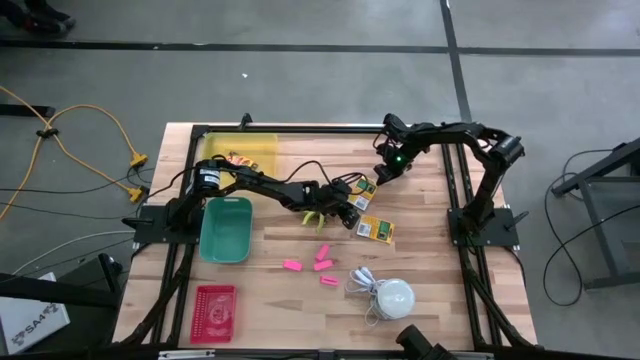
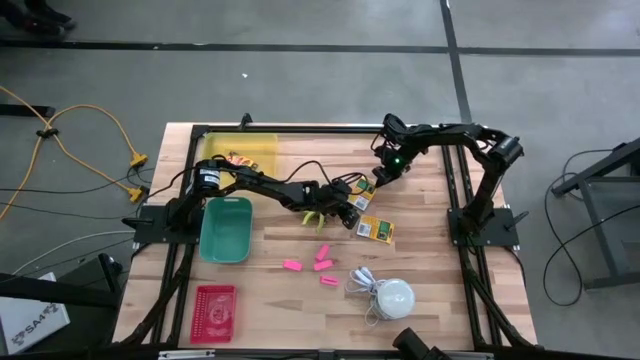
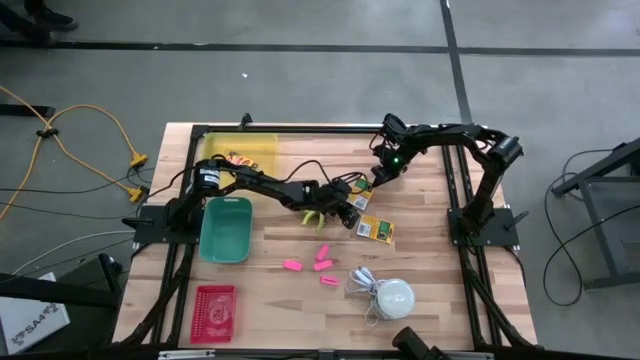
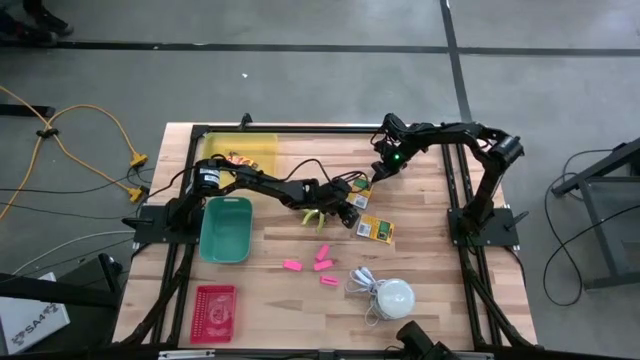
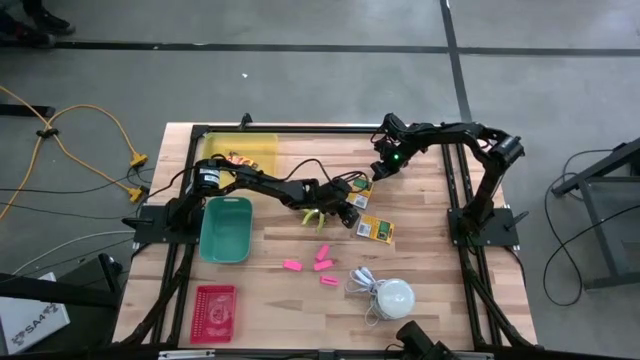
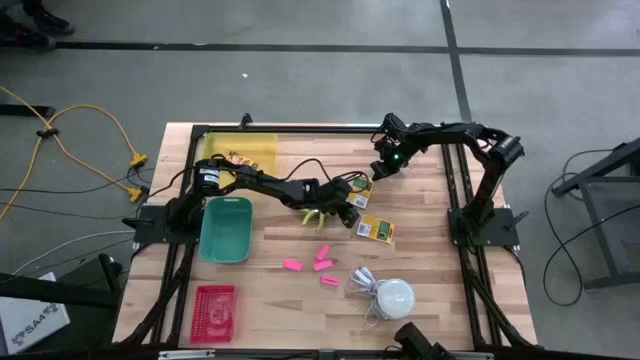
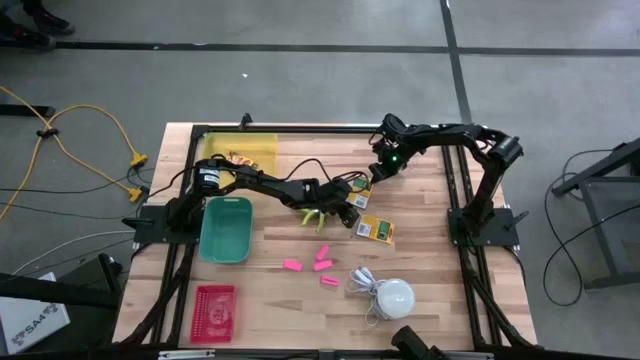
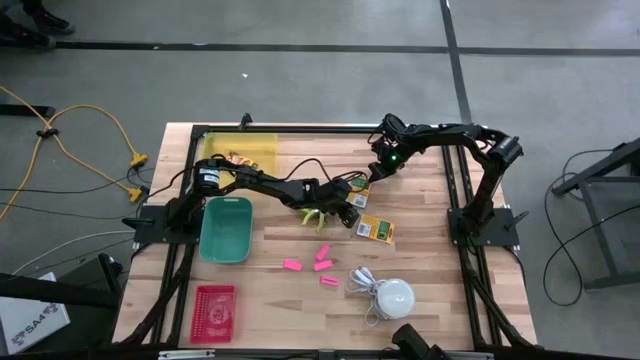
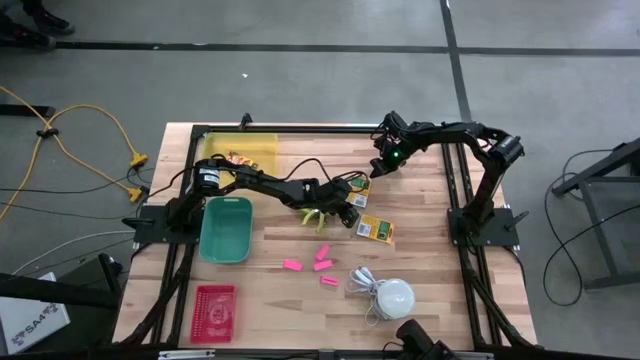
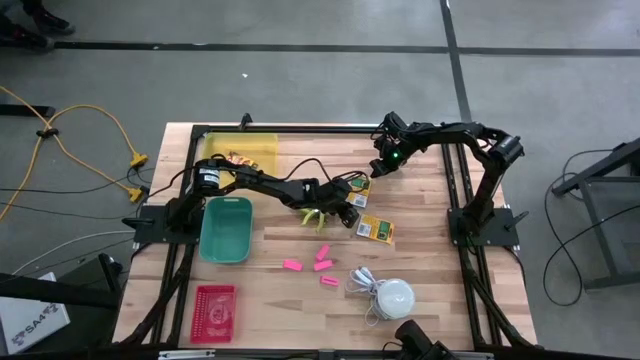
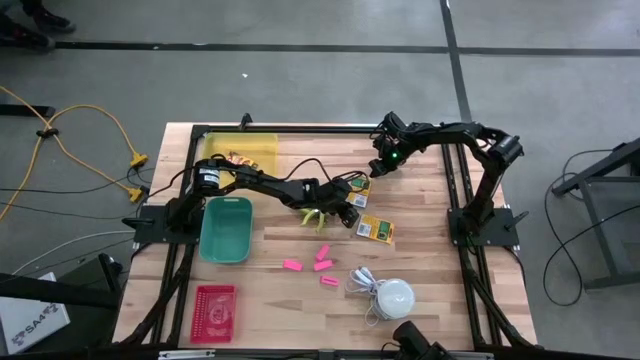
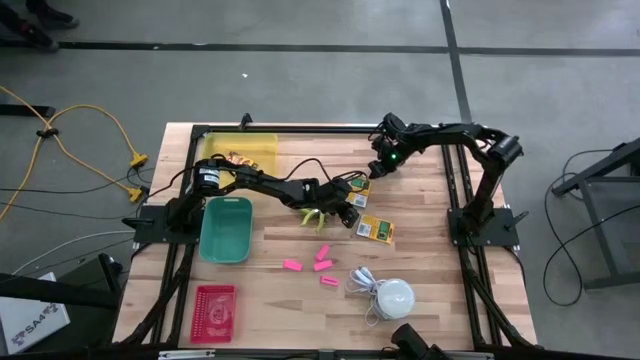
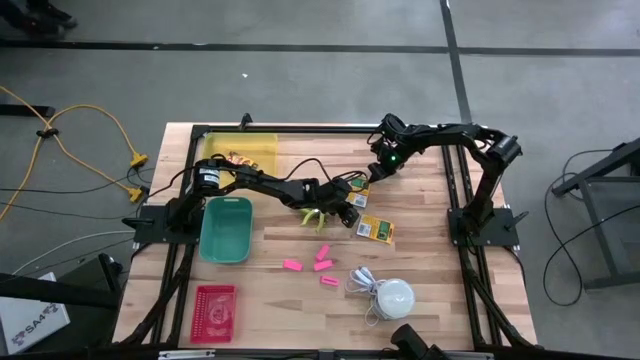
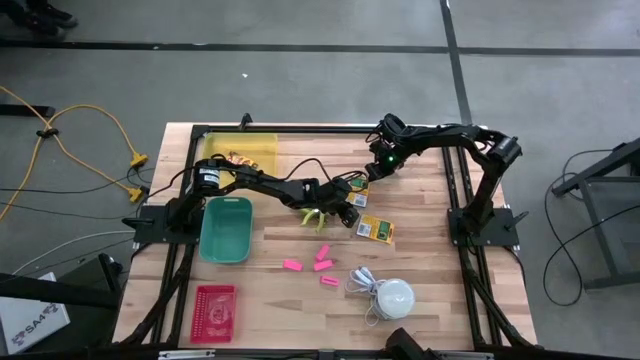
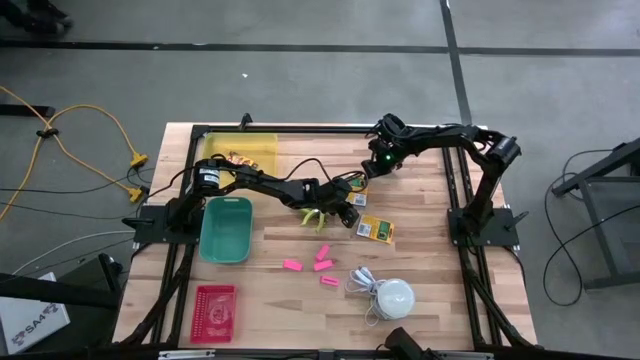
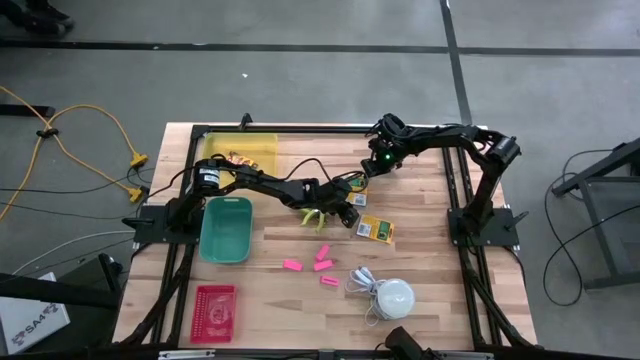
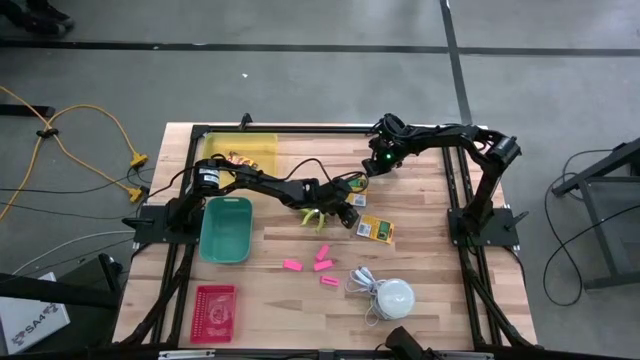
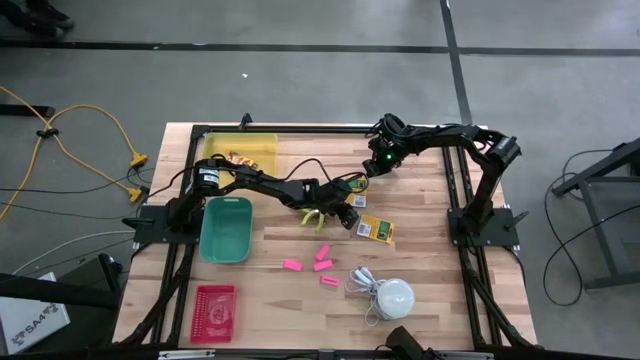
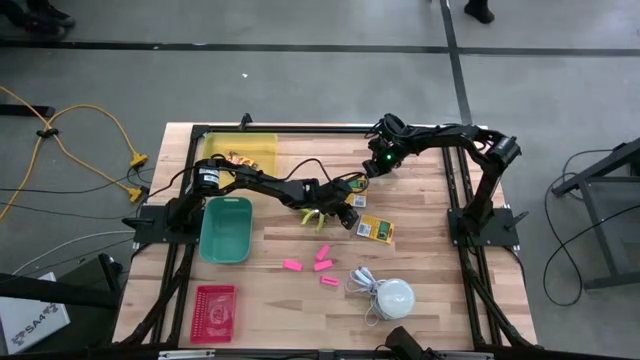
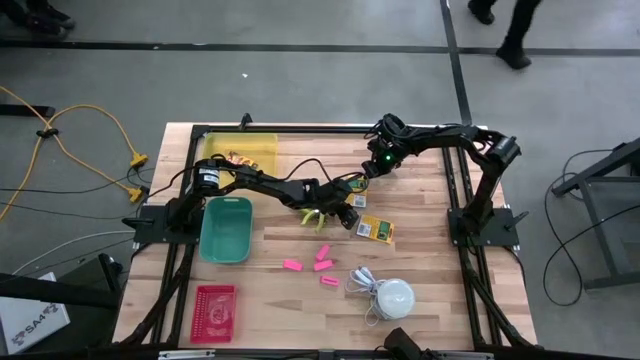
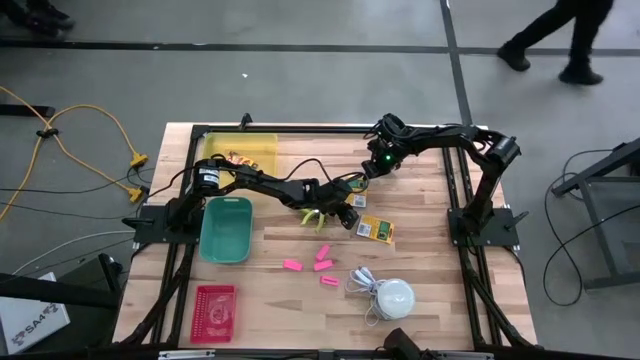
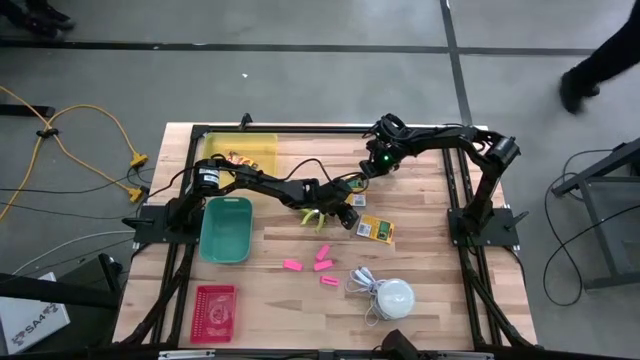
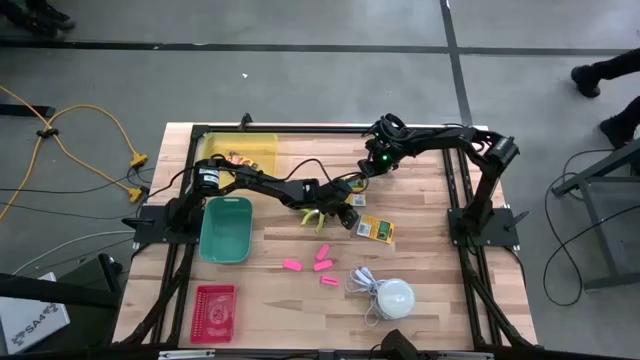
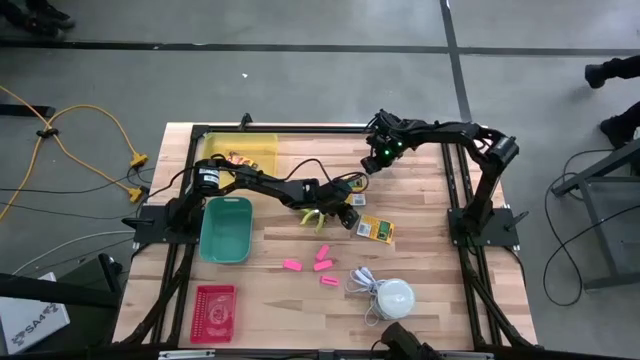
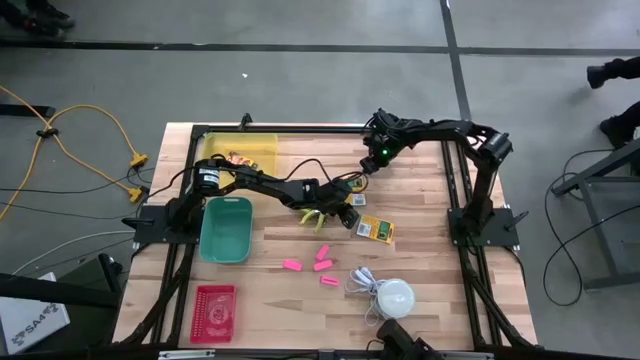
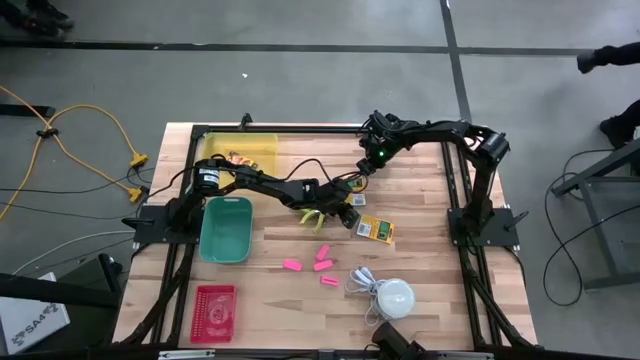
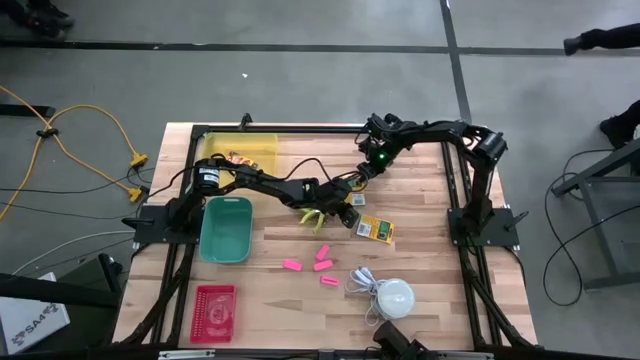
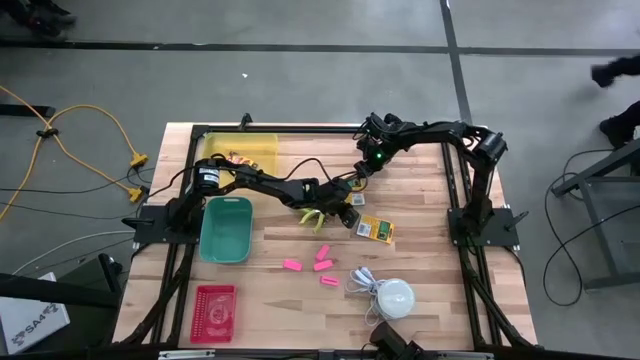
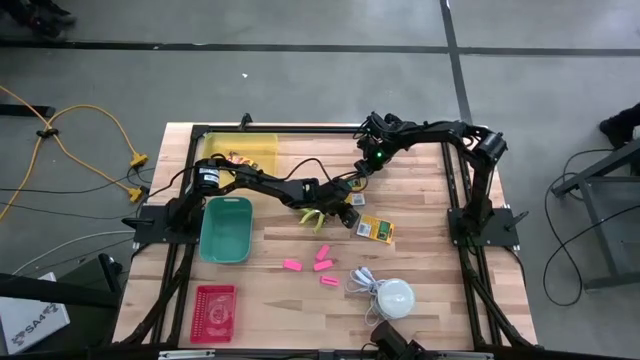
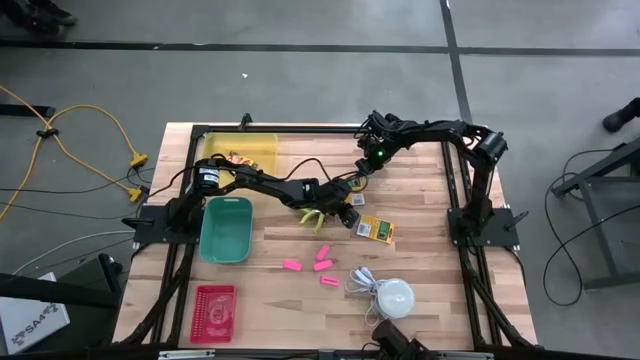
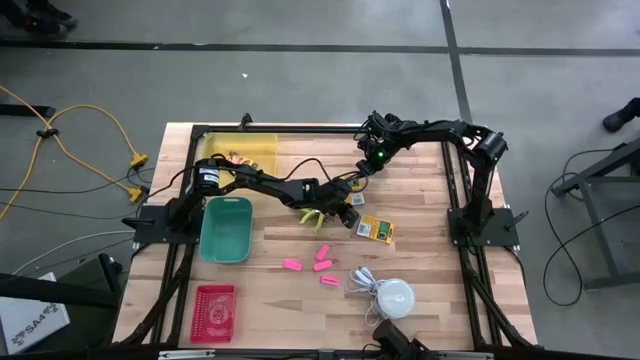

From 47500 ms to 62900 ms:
Task: Pick & Place School Supplies
Put the top yellow crayon box into the yellow bin

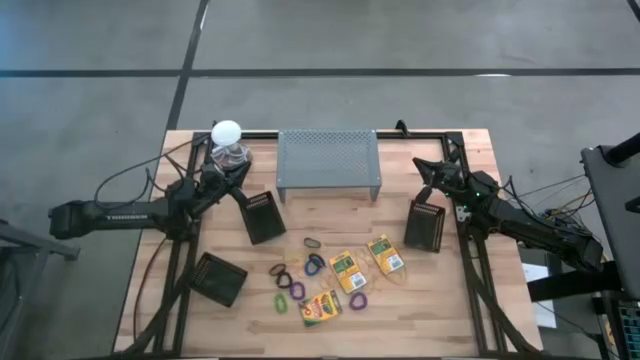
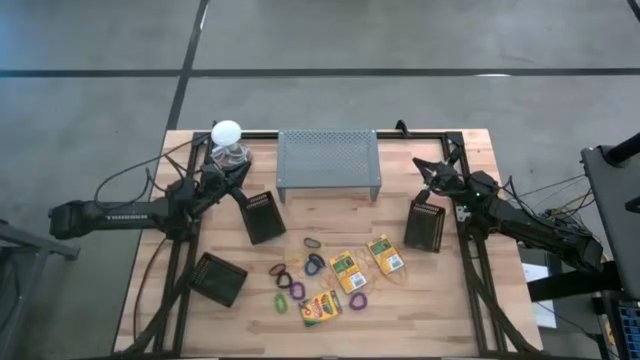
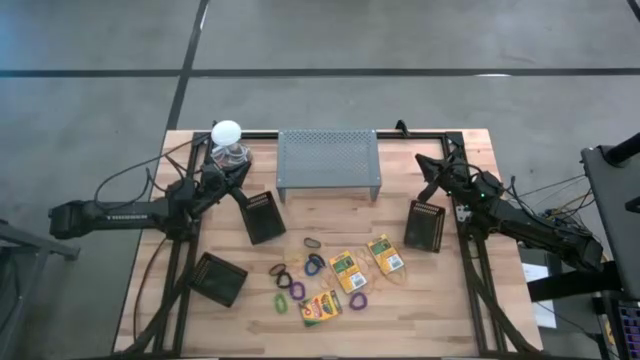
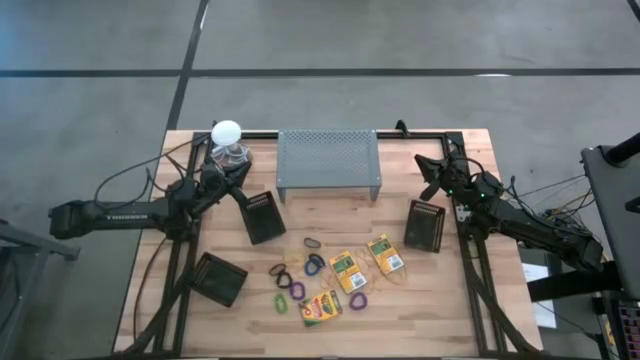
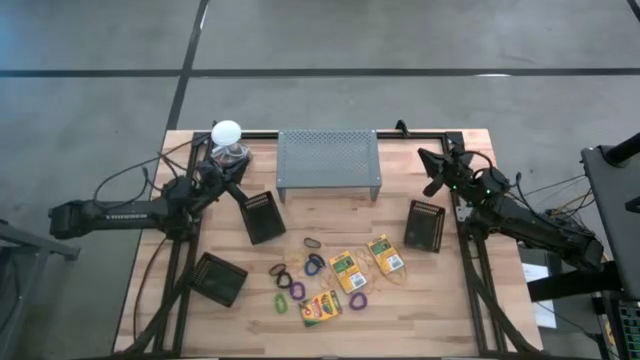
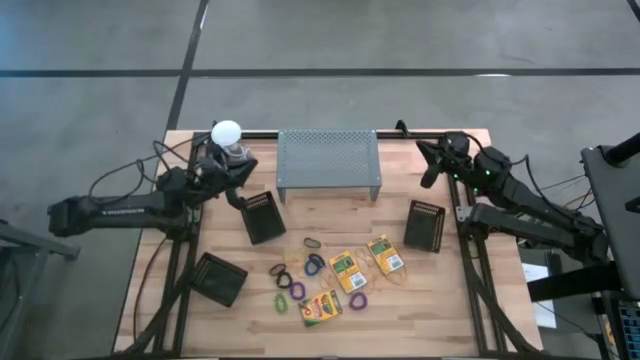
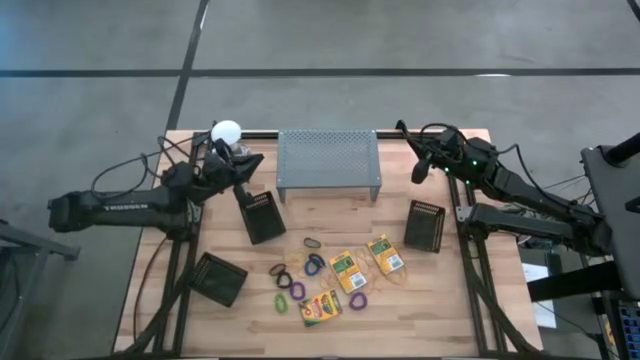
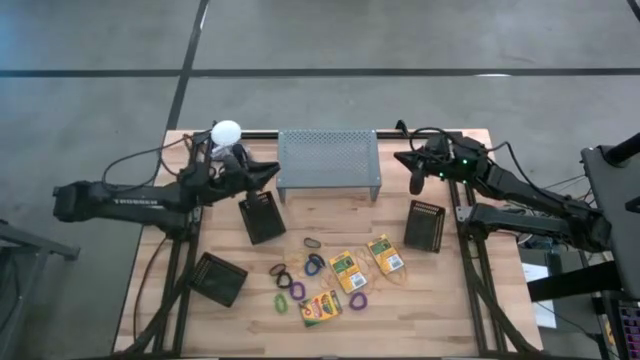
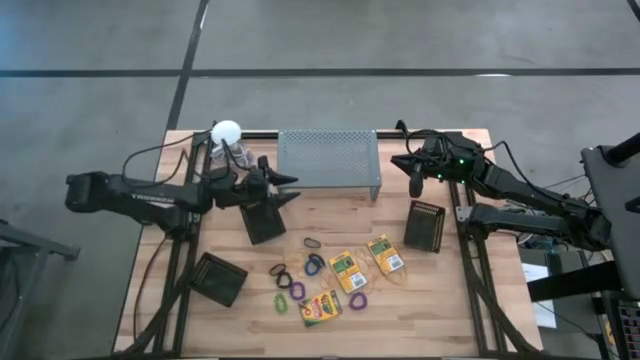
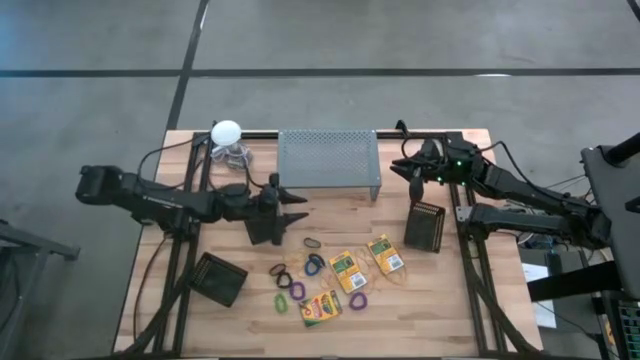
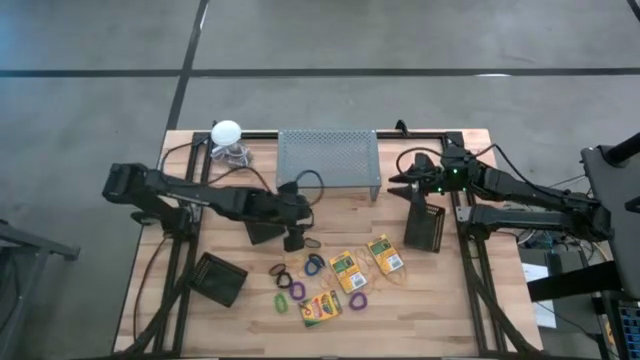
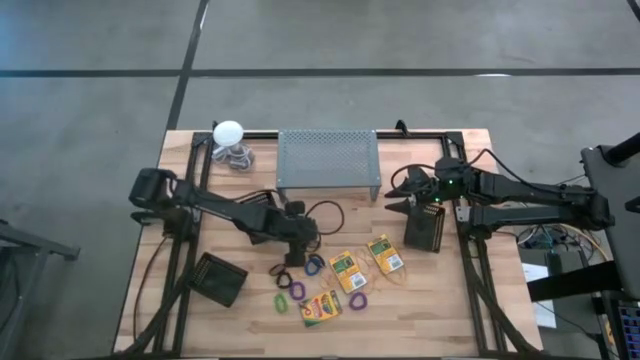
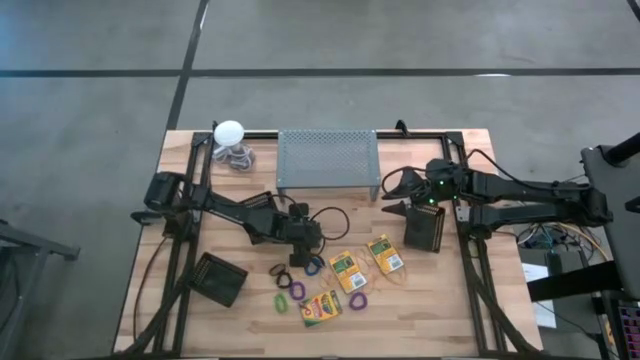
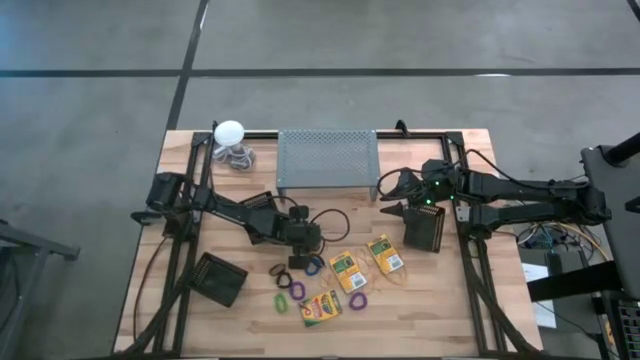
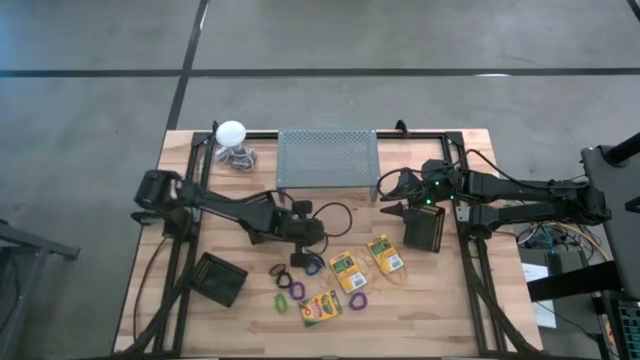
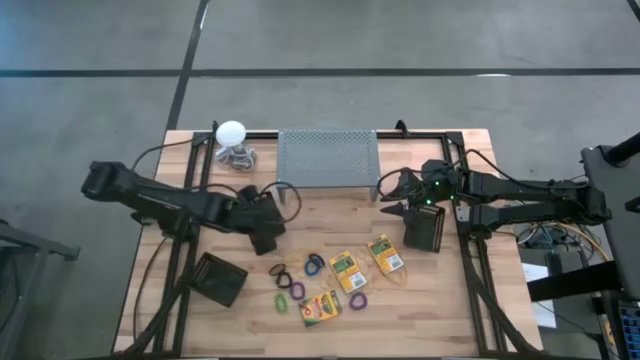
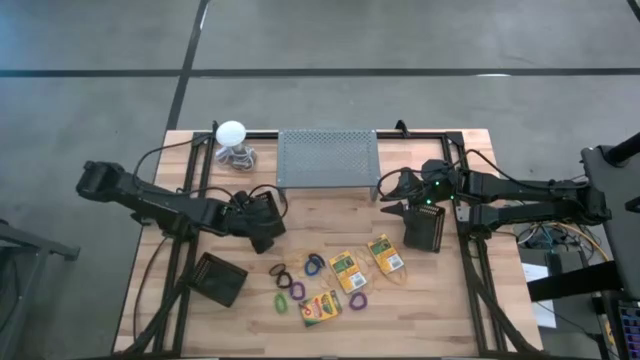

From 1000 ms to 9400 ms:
Task: Pick & Place Office Desk Supplies
Put the black rubber band into the top left black bin
